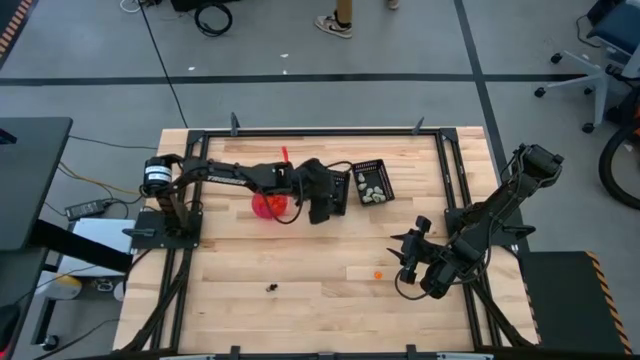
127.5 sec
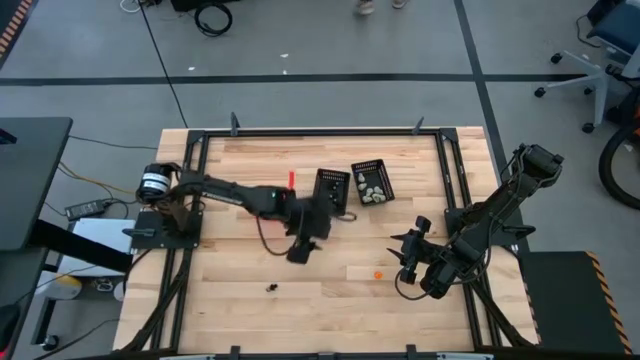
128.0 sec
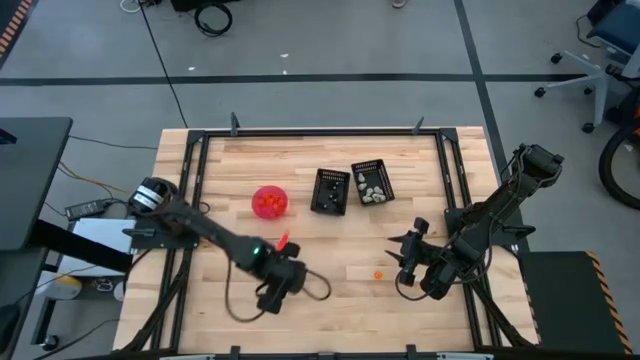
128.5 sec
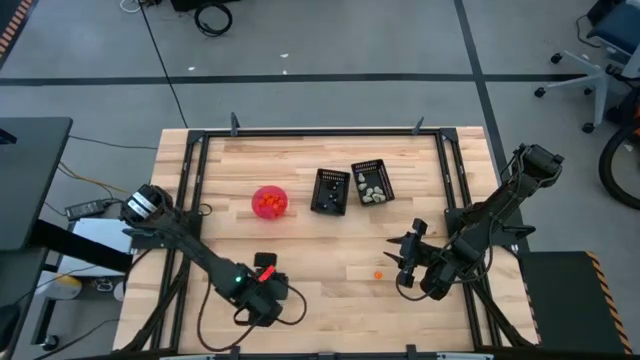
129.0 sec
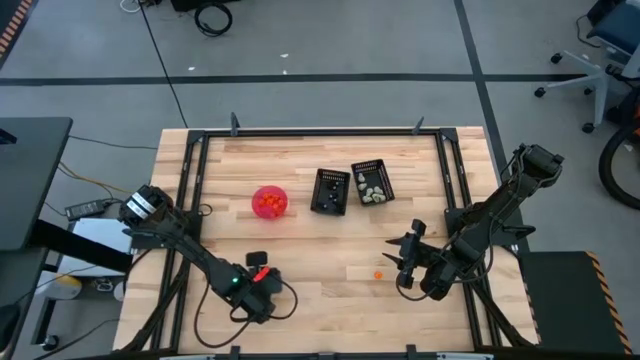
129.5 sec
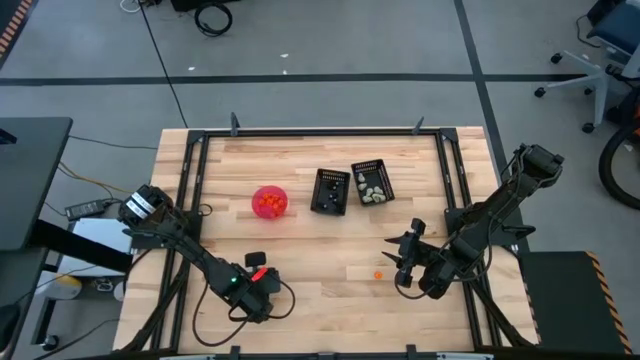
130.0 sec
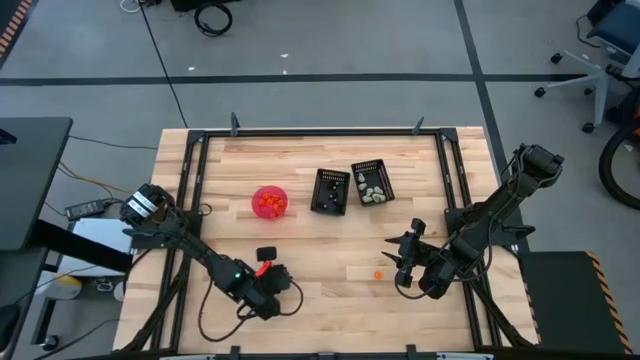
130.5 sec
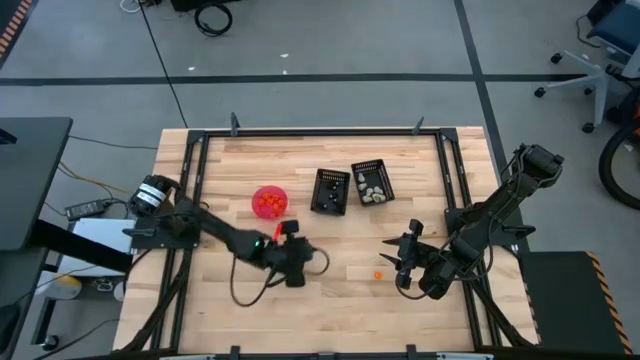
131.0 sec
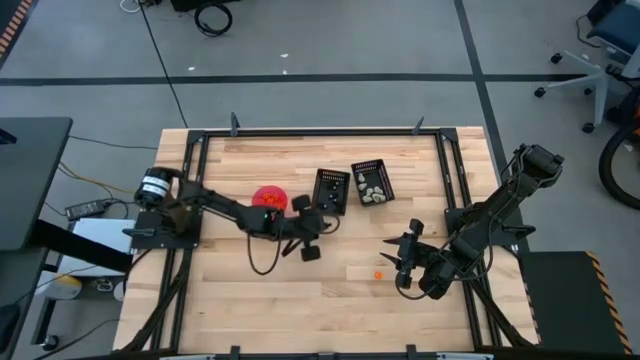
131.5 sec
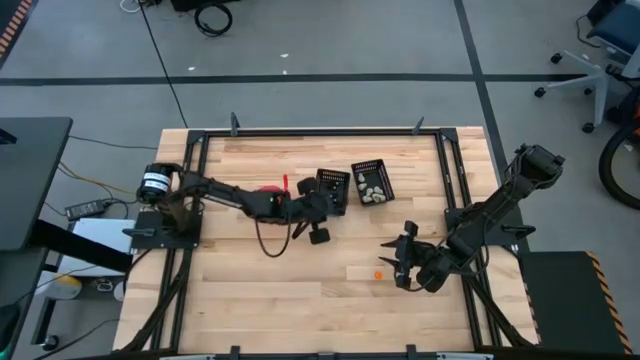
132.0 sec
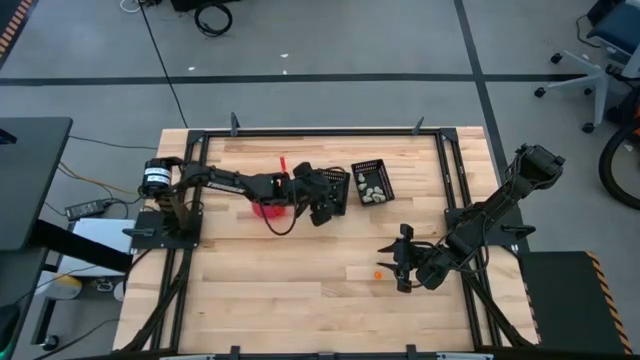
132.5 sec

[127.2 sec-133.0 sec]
Task: Sort Halloween decoration
Put the black skeleton toy into the left black bin

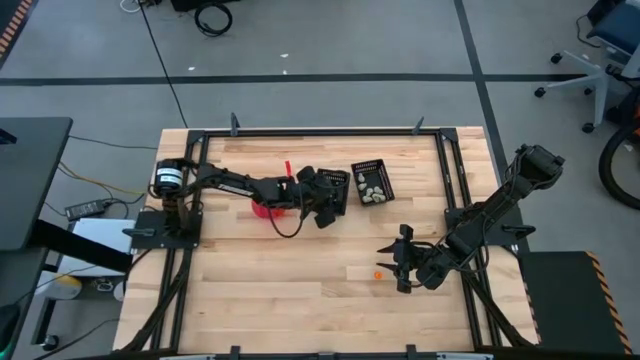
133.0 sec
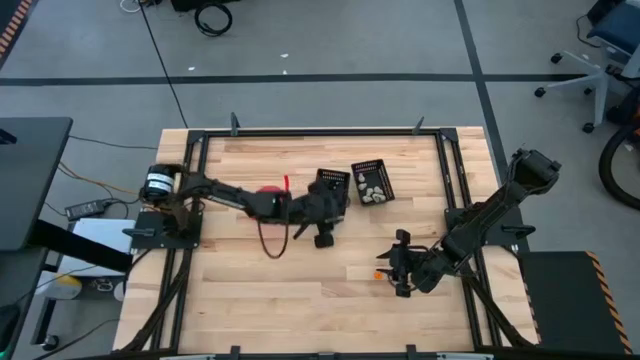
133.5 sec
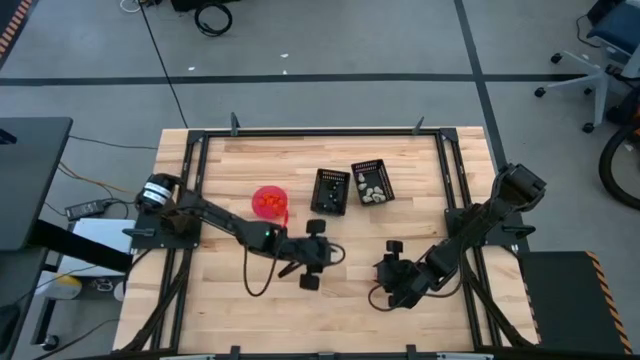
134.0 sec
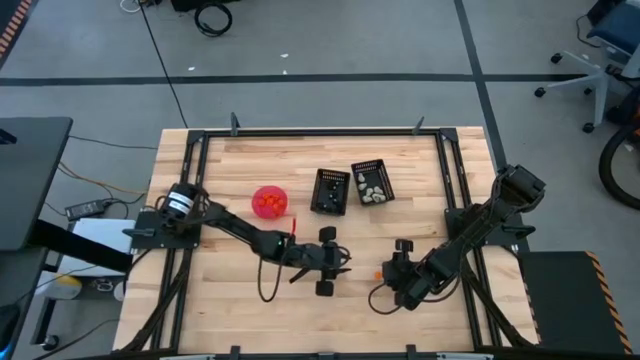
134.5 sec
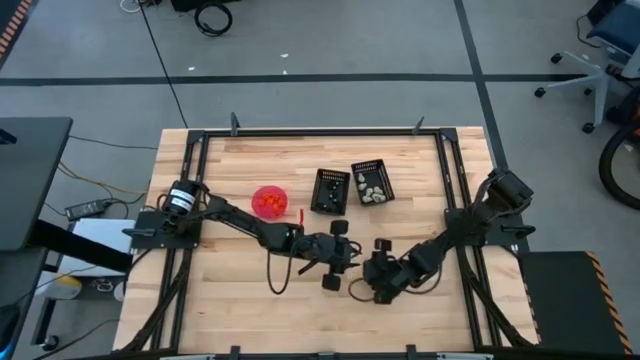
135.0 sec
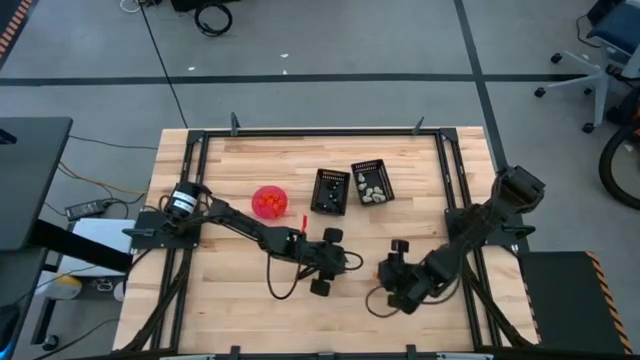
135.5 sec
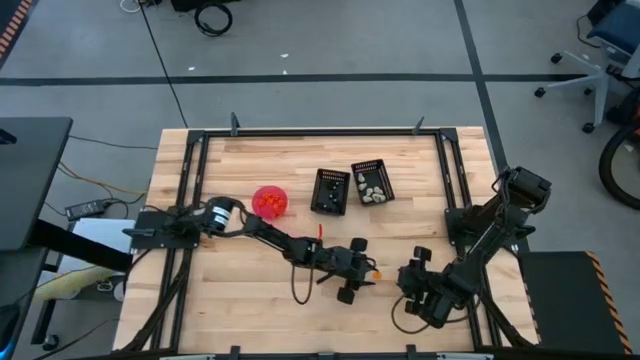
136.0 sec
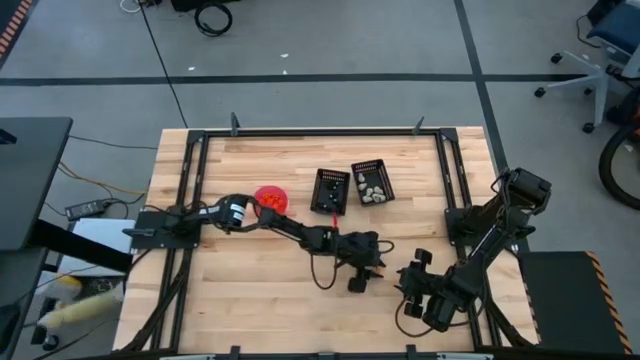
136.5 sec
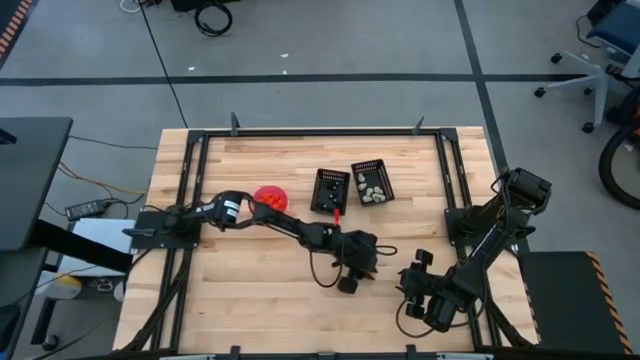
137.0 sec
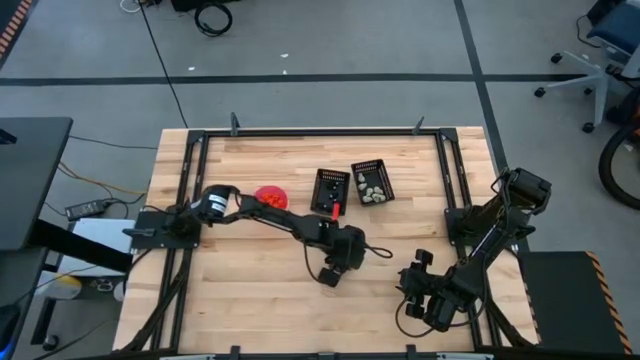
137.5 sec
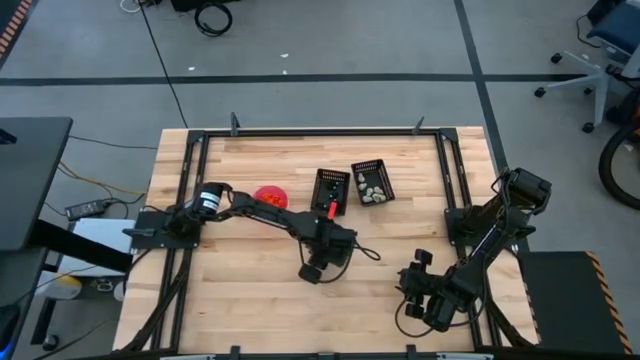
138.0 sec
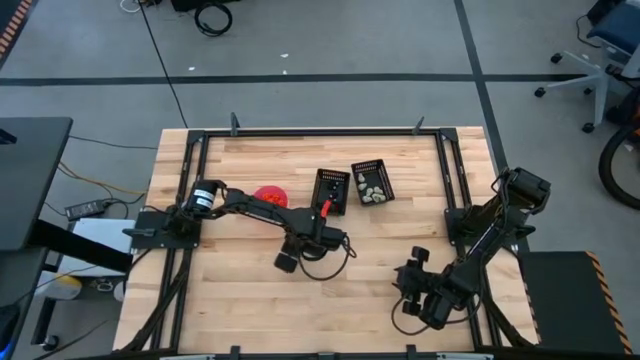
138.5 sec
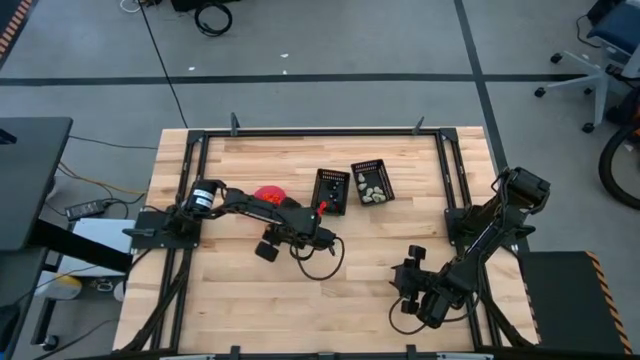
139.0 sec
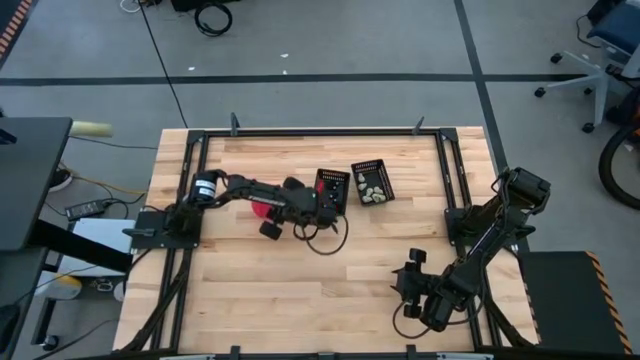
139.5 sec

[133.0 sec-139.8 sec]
Put the orange pumpkin toy into the red bowl

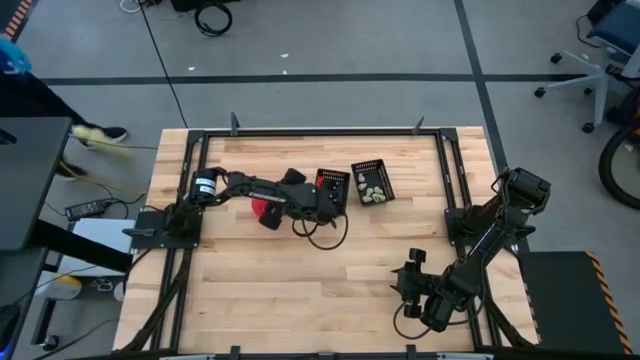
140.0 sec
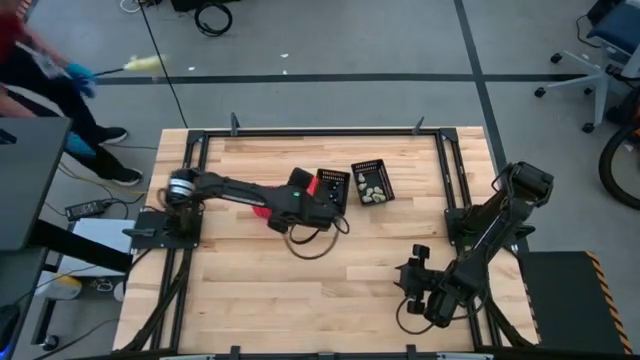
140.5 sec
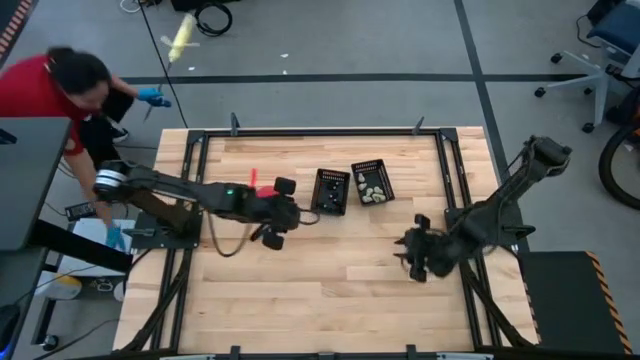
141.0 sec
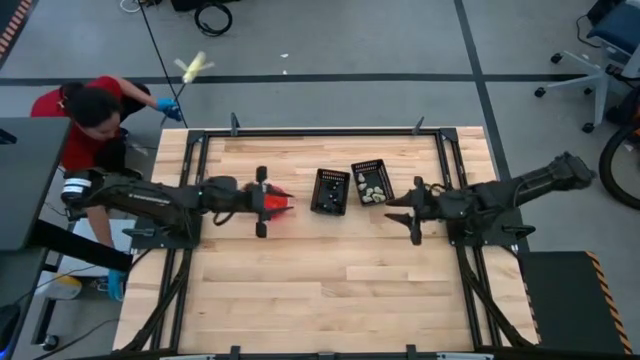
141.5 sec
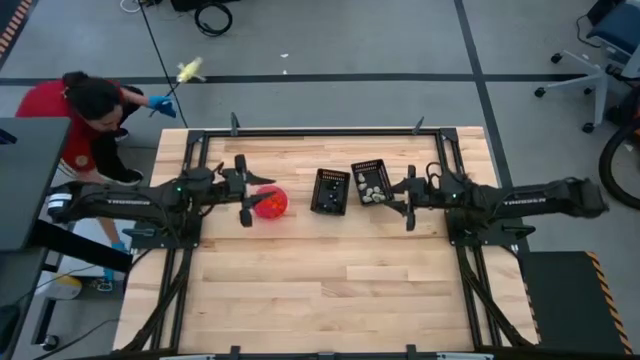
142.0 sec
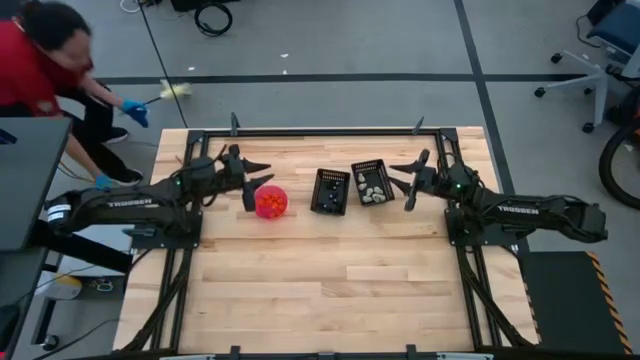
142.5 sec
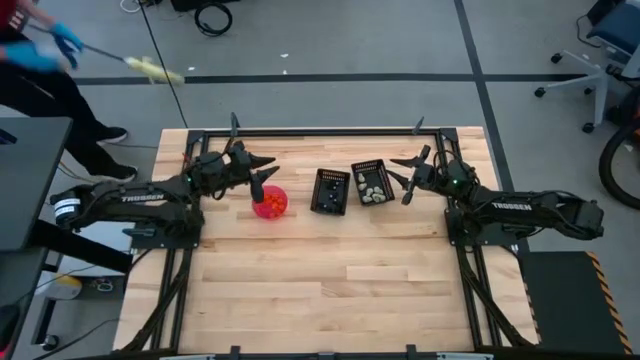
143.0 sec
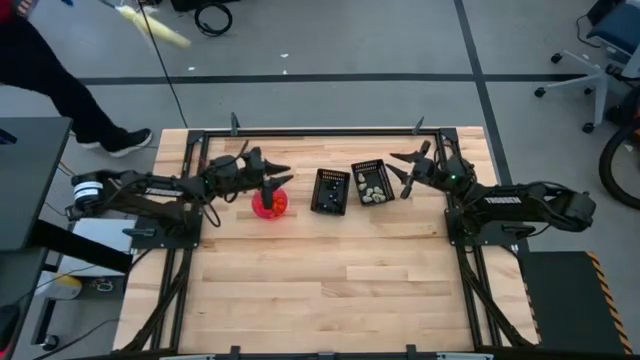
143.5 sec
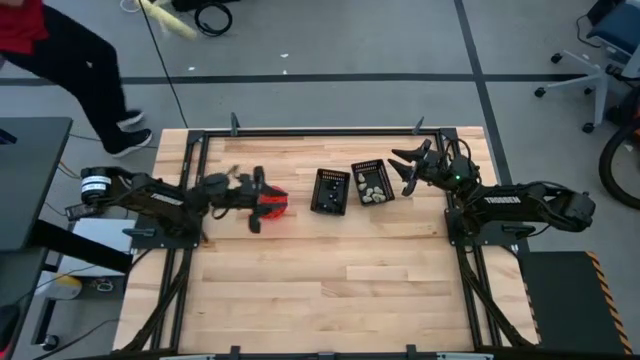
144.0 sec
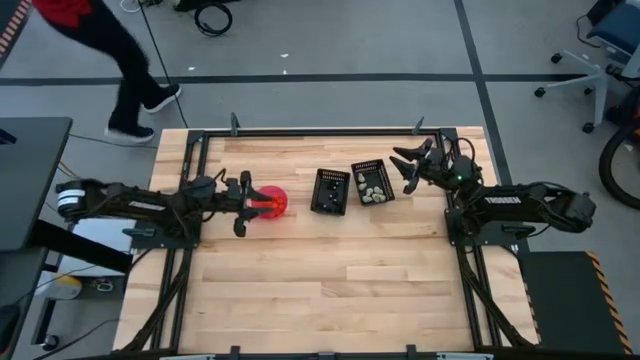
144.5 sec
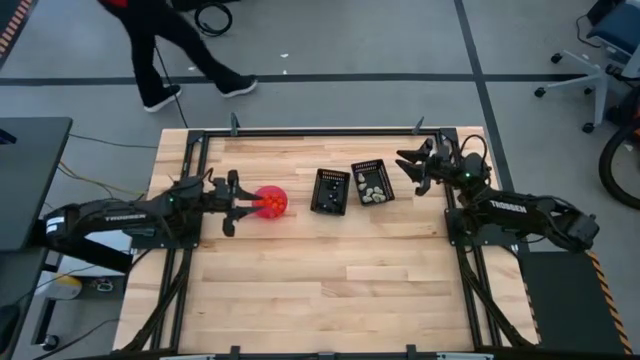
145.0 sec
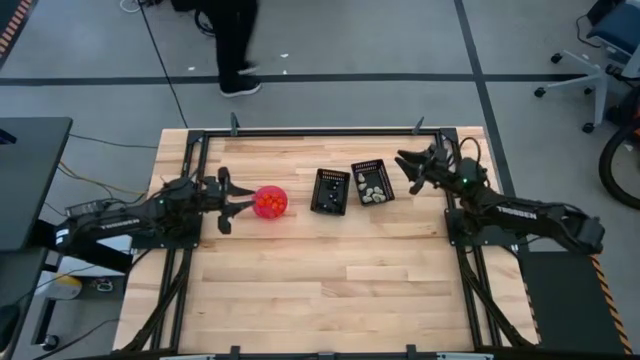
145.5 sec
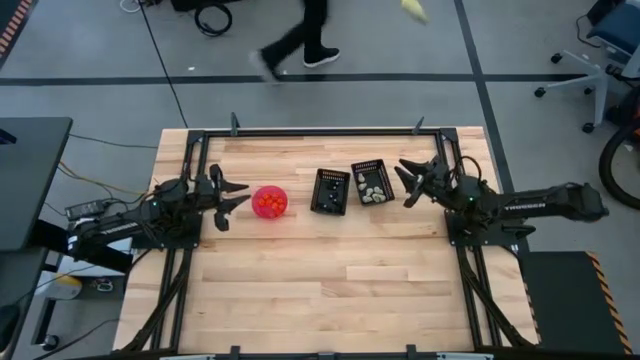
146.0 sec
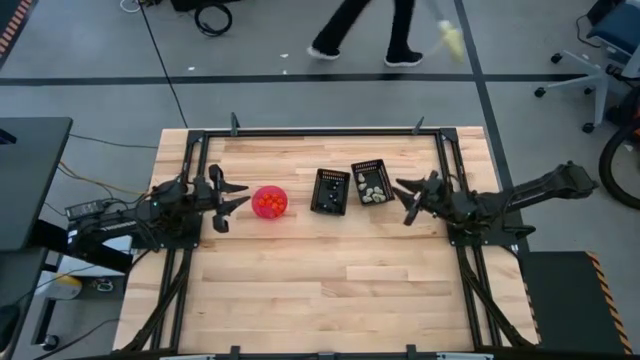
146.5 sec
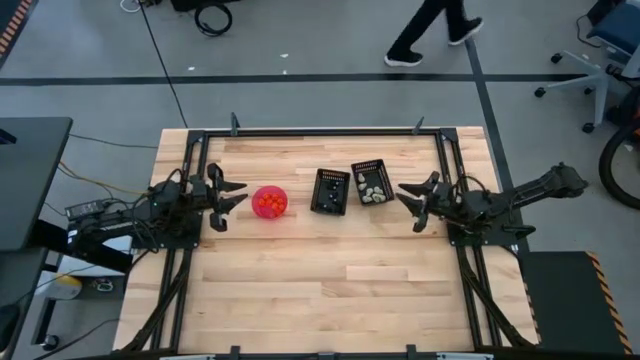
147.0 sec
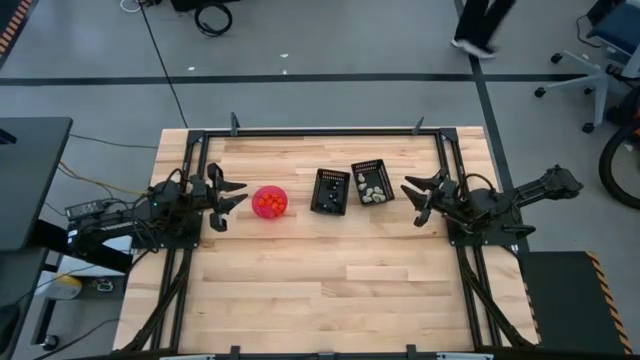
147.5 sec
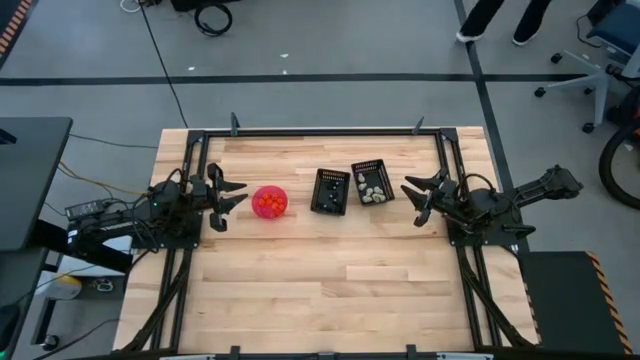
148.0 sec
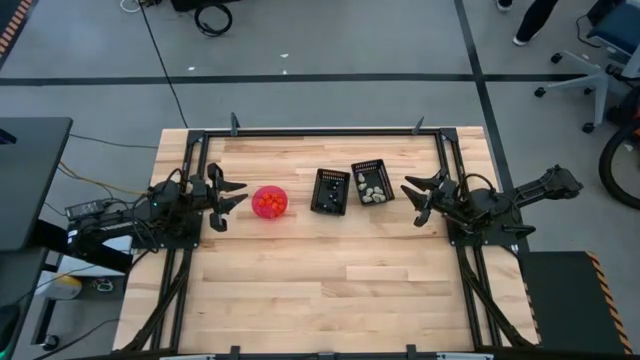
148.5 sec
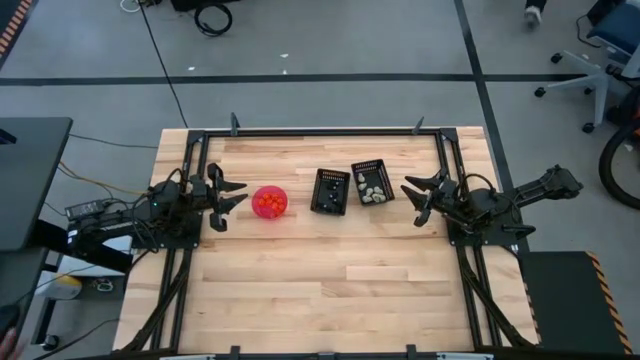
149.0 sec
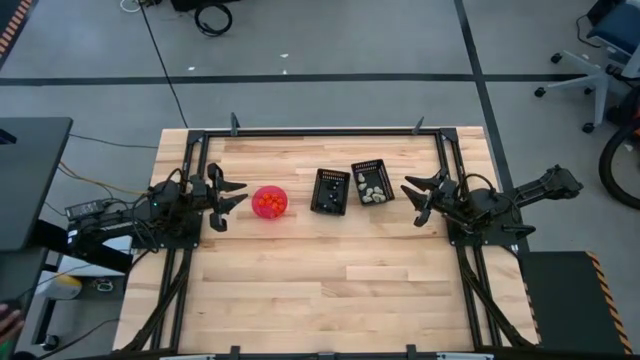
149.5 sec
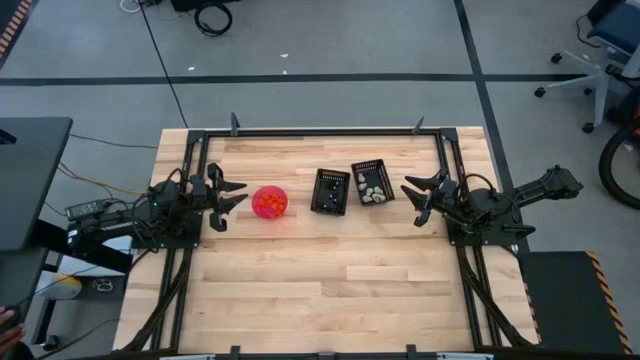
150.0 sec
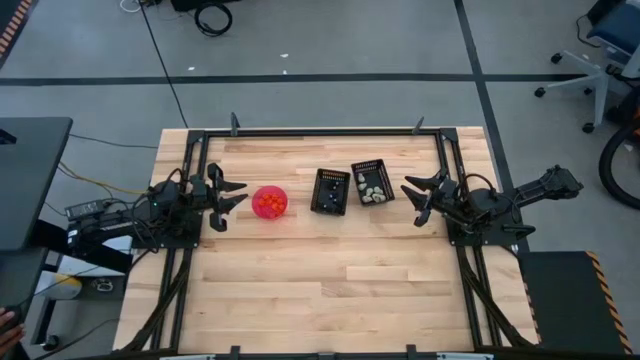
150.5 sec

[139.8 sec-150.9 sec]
Return to Home Position
